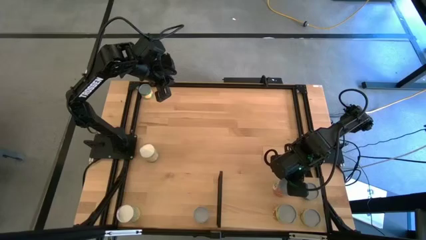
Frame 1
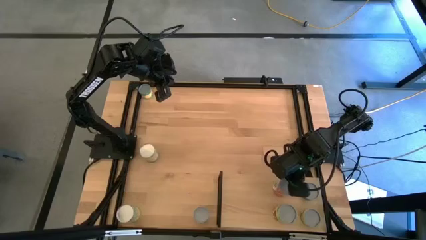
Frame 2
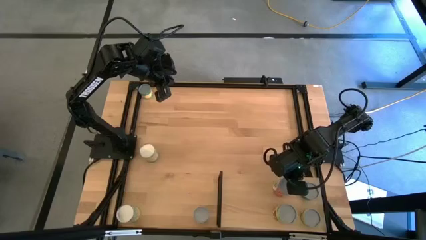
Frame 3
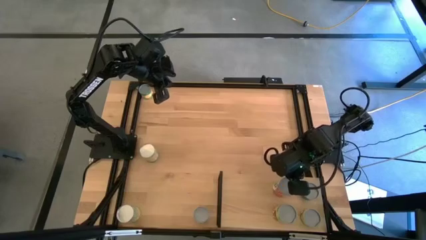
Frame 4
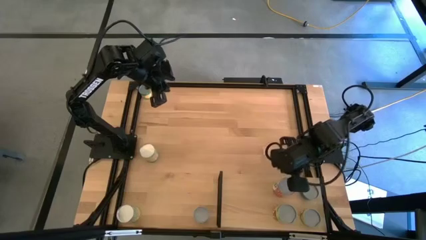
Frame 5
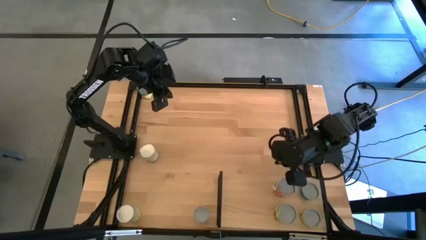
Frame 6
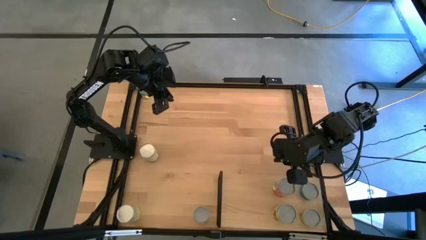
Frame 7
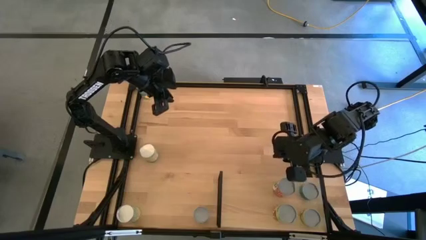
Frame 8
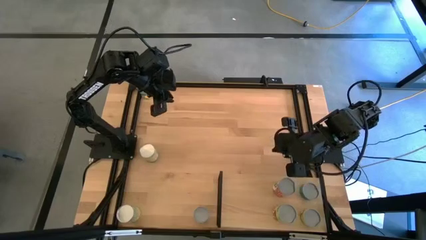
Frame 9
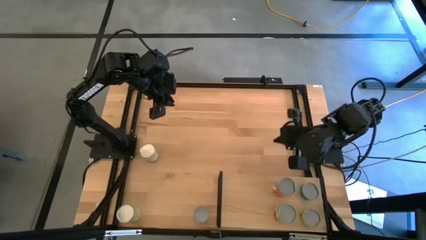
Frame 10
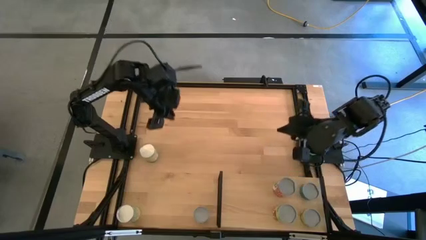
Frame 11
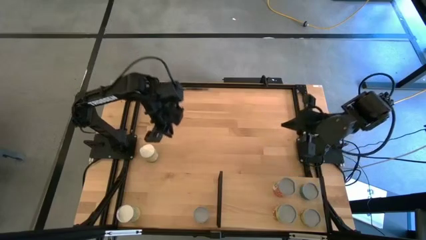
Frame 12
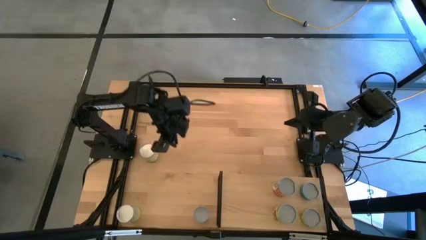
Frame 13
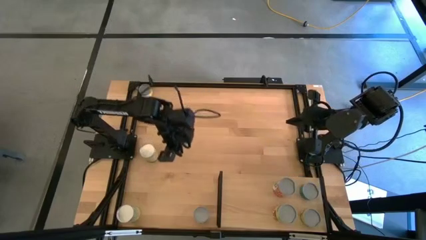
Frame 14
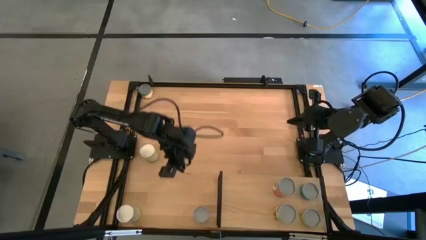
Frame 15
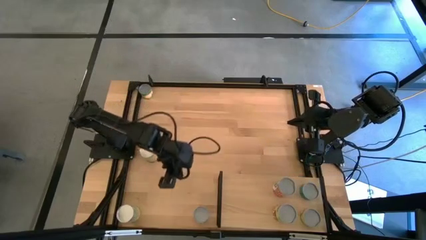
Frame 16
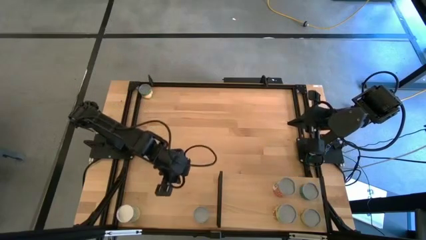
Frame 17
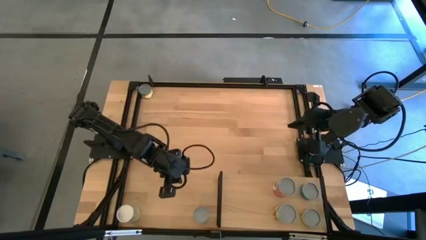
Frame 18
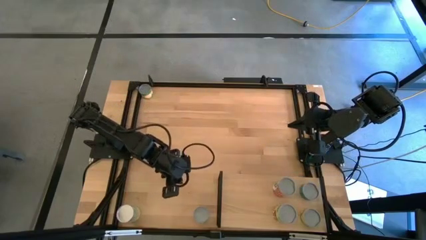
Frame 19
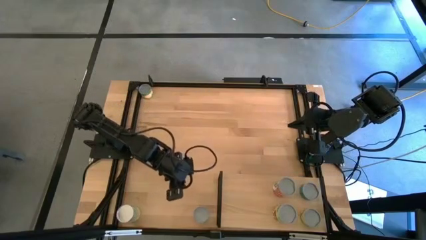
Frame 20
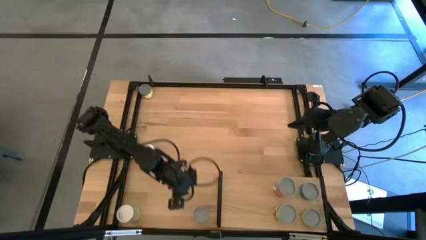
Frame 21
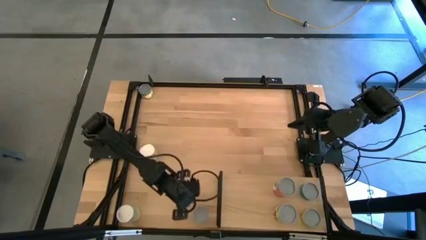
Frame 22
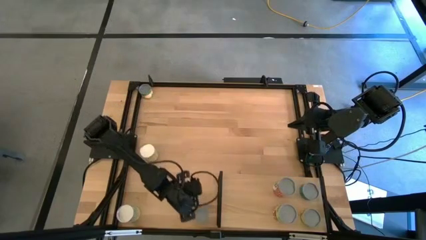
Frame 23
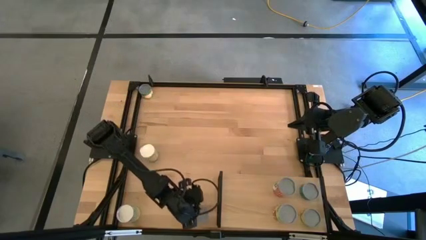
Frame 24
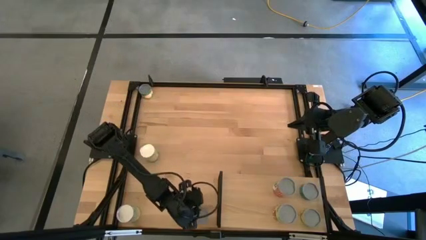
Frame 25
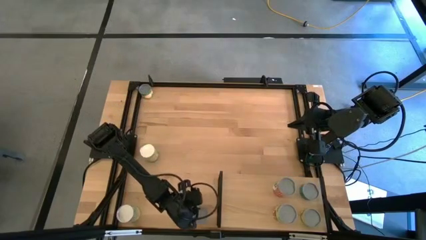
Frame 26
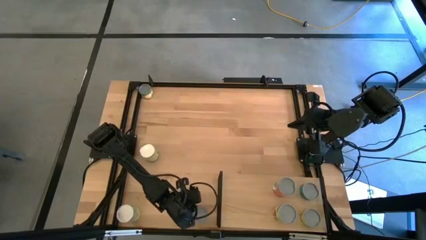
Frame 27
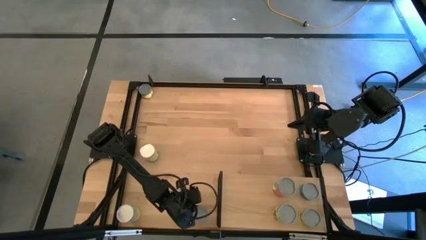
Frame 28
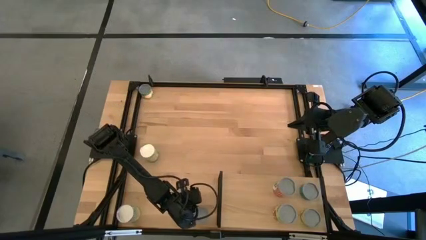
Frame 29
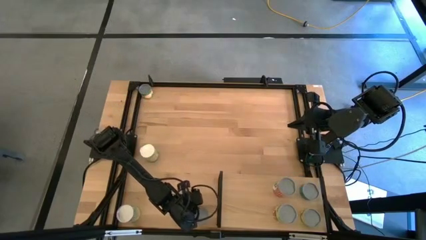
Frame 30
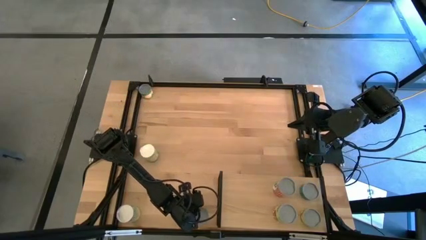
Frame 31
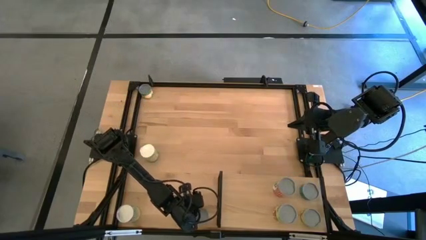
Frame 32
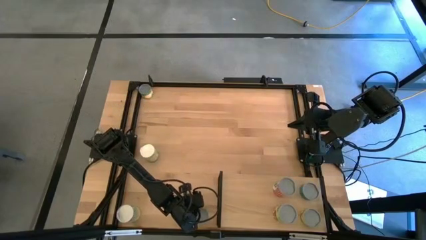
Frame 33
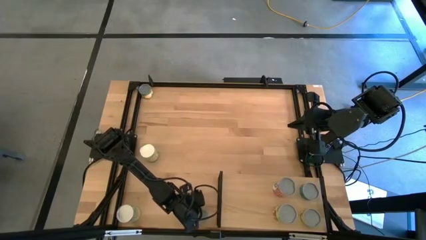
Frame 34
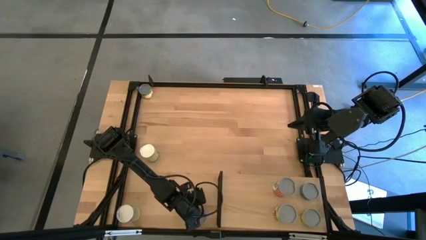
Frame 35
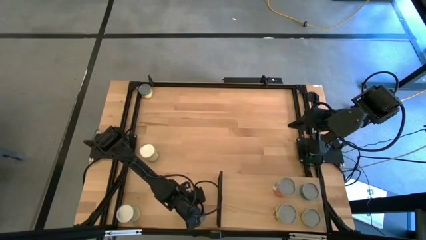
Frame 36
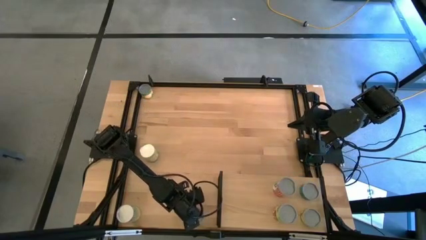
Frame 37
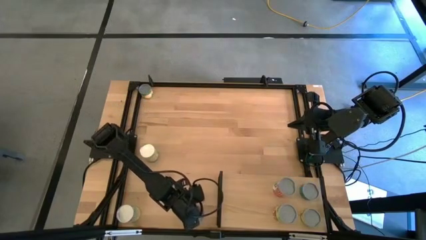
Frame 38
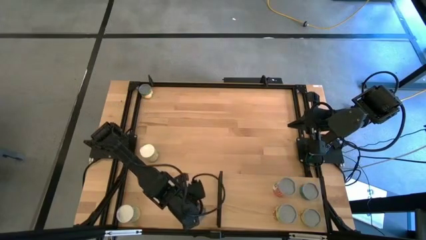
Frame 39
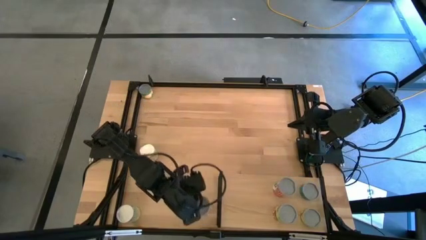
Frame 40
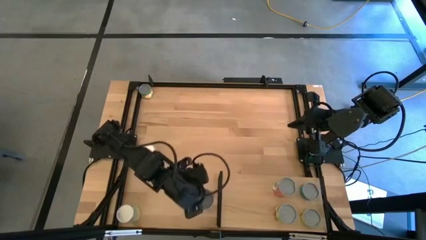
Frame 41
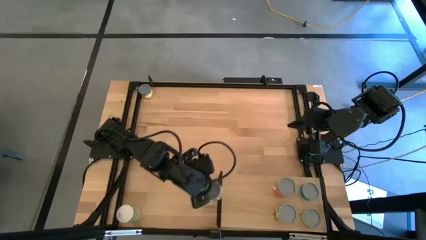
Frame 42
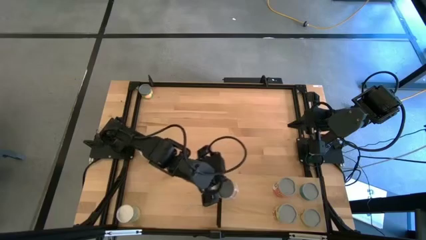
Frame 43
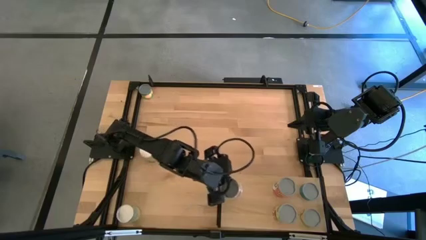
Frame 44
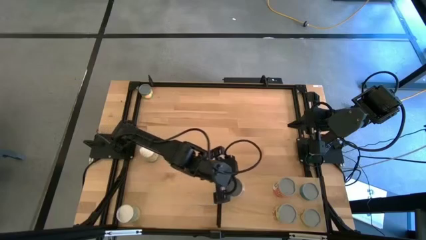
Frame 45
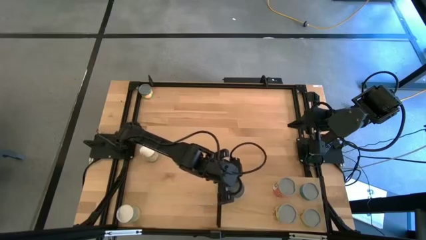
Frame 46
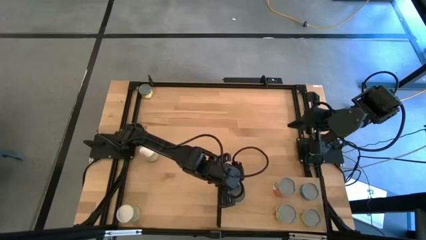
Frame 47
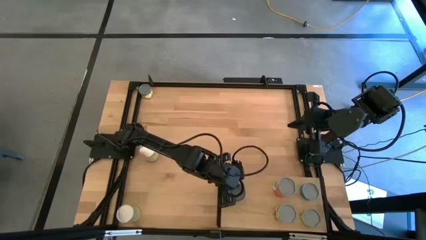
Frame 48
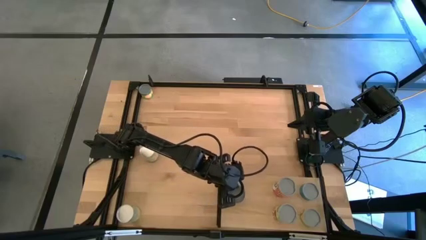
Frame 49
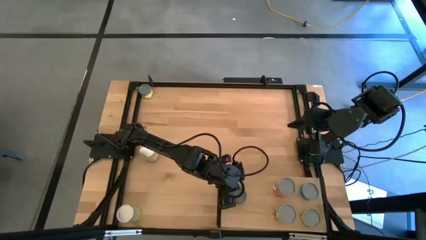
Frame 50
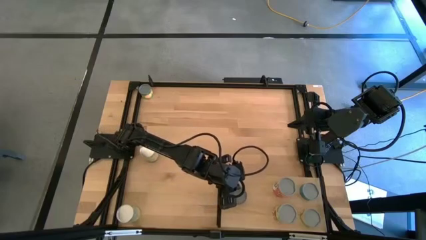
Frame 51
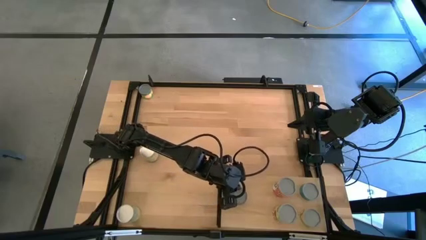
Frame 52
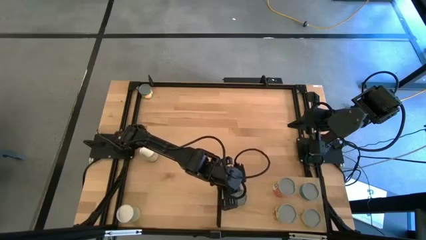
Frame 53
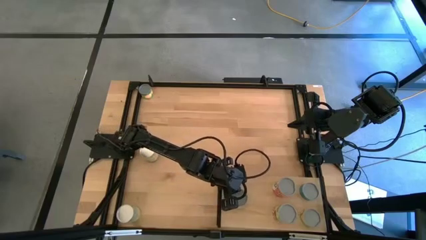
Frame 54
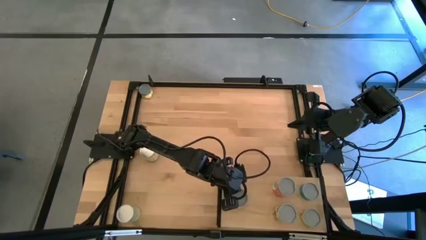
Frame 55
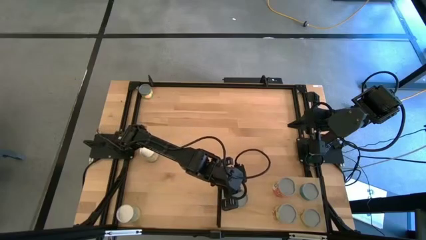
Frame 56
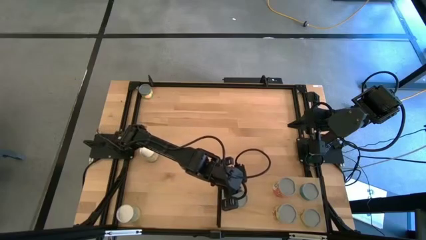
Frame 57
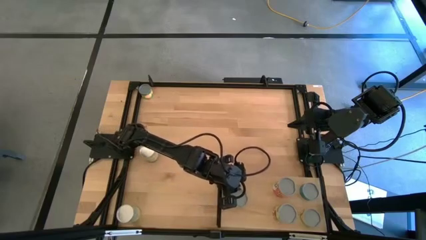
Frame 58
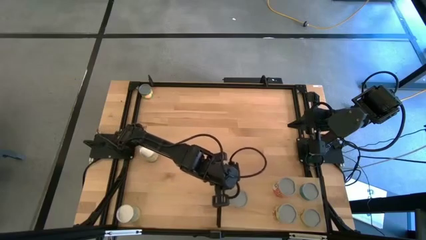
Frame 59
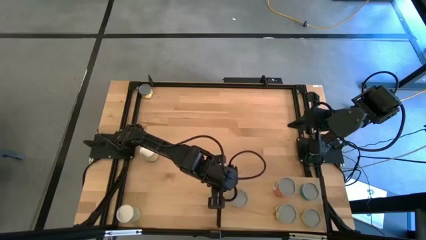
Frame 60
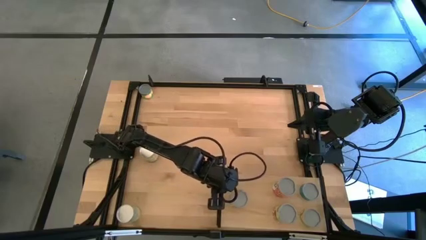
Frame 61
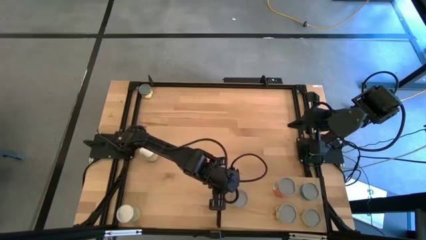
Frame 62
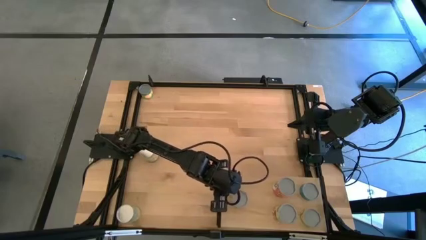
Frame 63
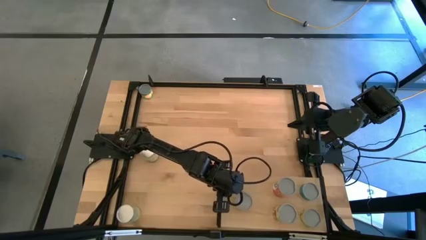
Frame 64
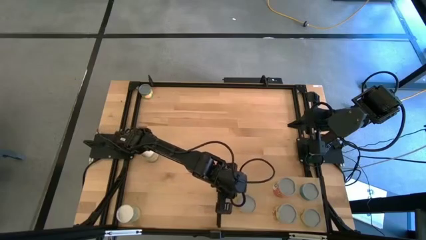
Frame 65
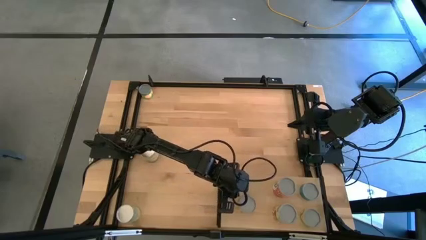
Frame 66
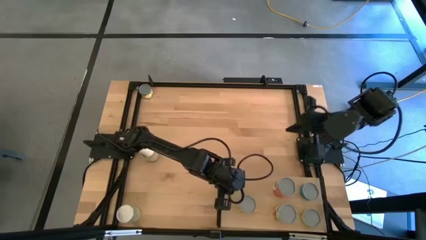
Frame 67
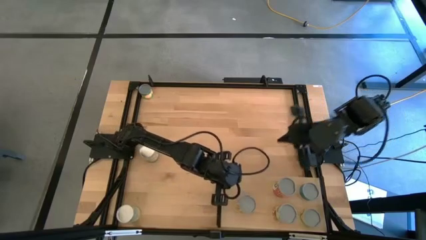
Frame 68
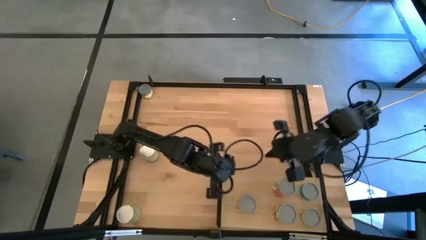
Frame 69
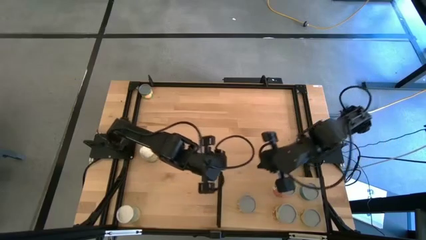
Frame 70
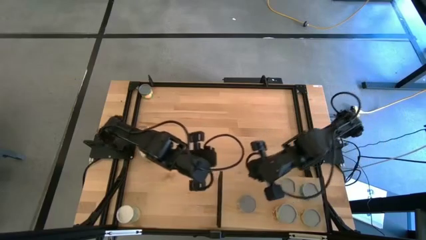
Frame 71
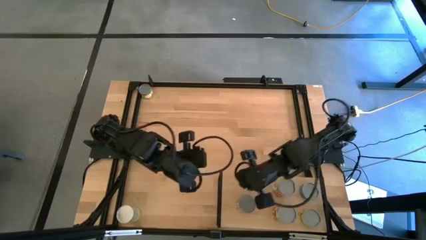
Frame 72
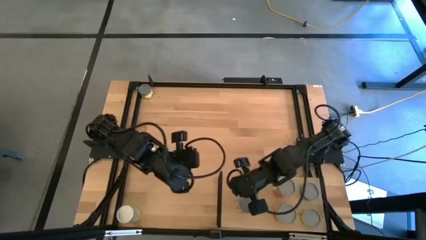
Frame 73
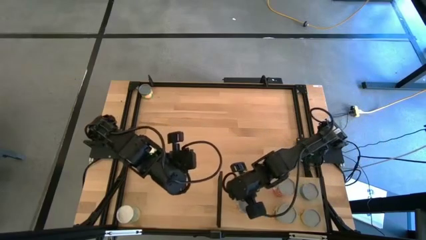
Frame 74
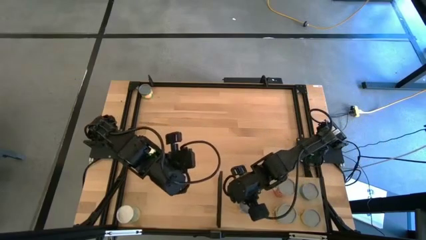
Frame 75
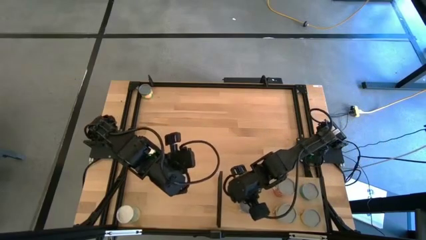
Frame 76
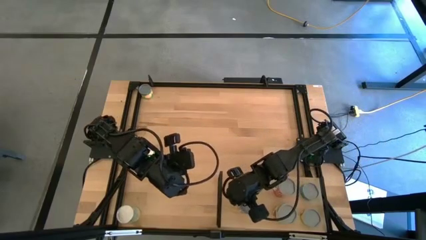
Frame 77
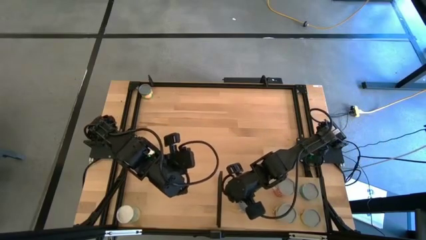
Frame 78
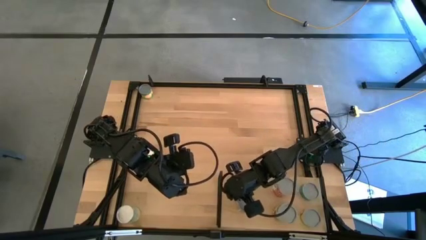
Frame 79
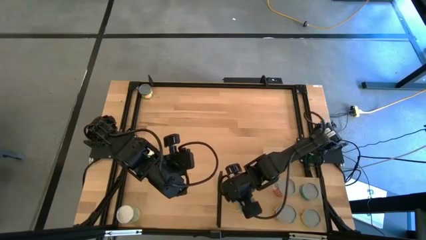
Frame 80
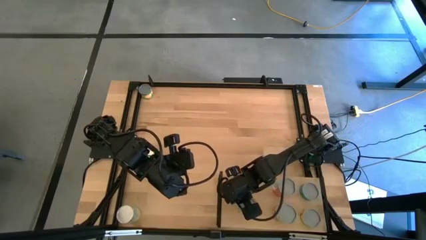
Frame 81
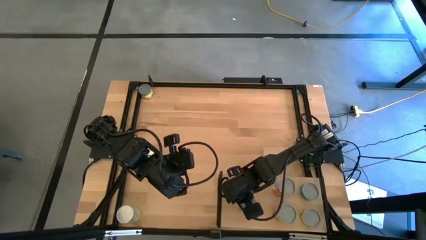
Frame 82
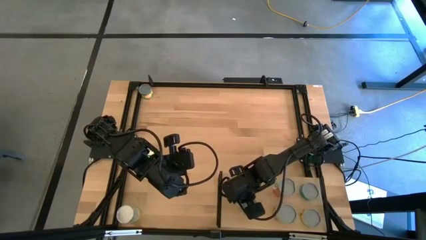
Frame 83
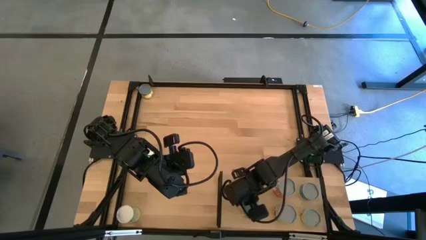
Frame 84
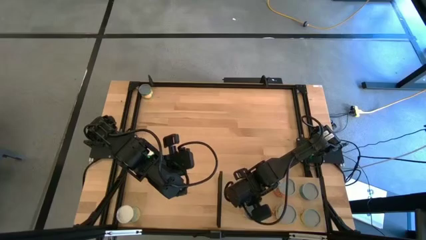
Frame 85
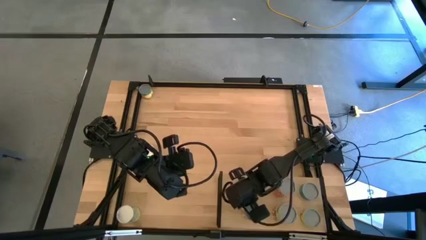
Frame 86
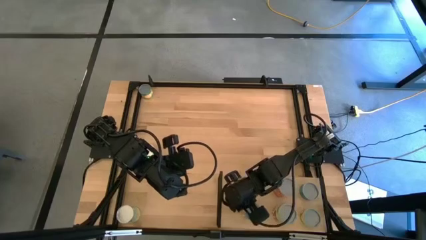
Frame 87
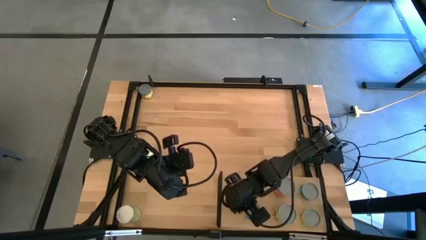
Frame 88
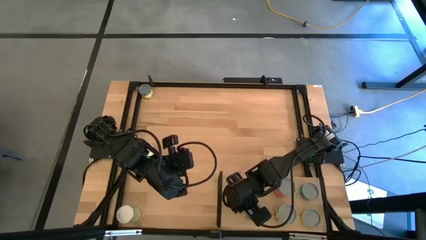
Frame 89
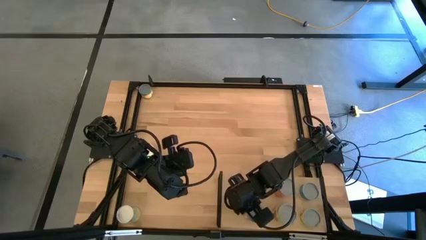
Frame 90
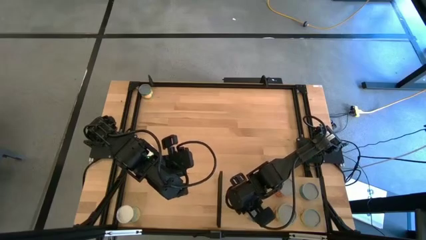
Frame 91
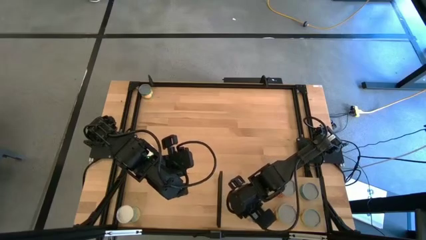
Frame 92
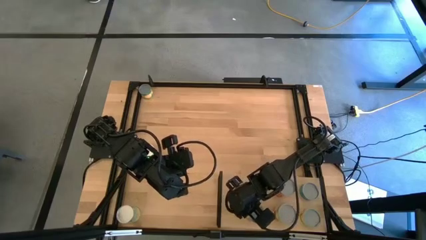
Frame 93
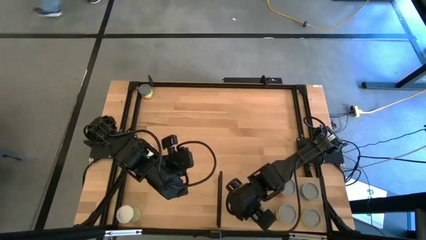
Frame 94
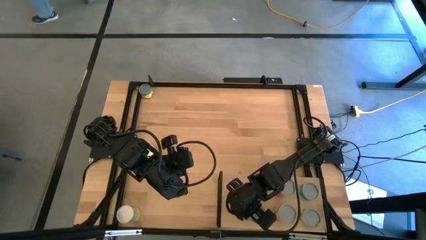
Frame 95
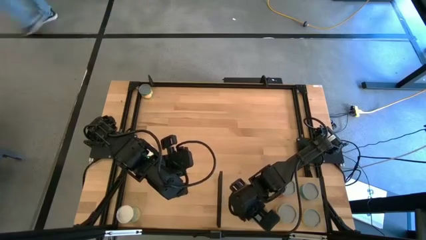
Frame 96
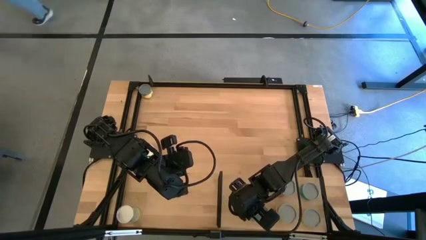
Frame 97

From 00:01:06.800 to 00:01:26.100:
Task: Pick and place cans onto a shelf
Put the canned diced tomato on the shelf
